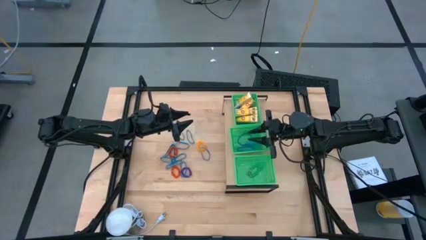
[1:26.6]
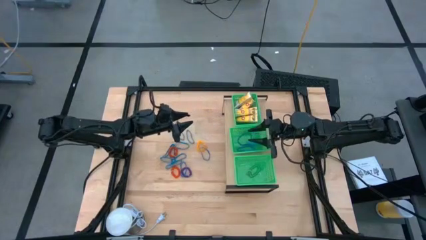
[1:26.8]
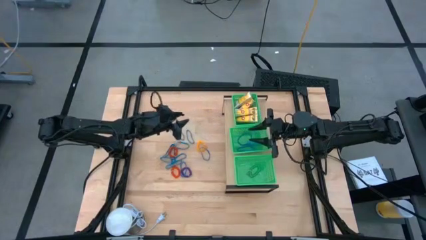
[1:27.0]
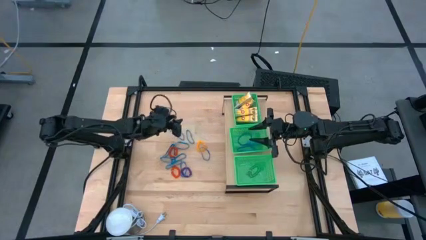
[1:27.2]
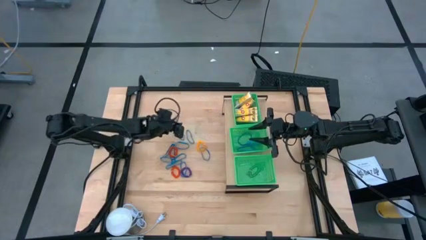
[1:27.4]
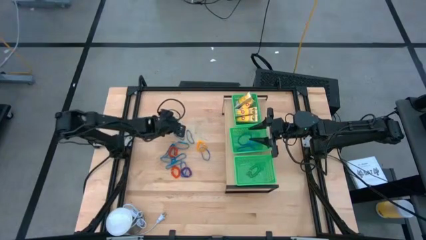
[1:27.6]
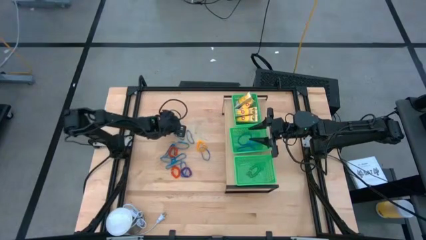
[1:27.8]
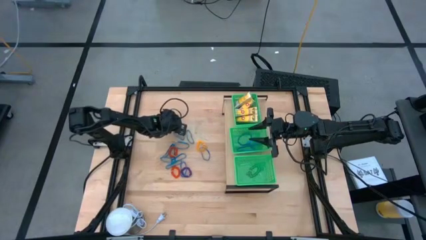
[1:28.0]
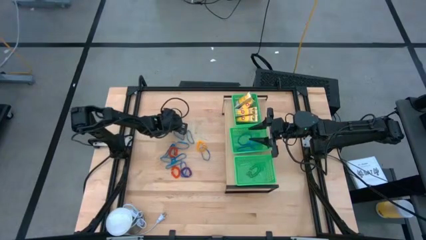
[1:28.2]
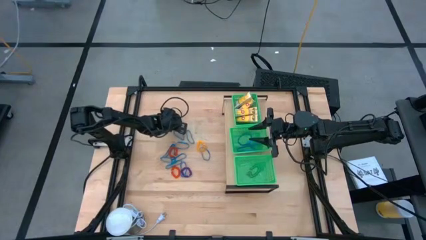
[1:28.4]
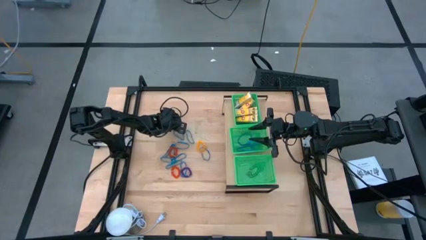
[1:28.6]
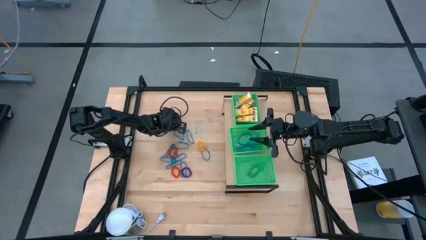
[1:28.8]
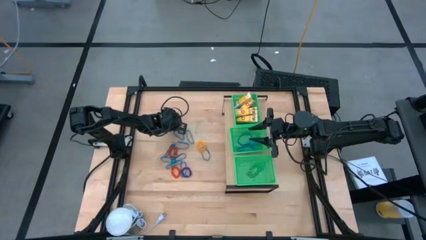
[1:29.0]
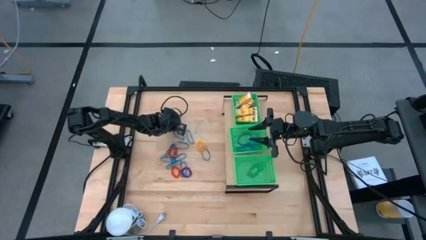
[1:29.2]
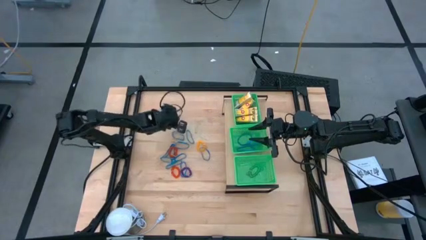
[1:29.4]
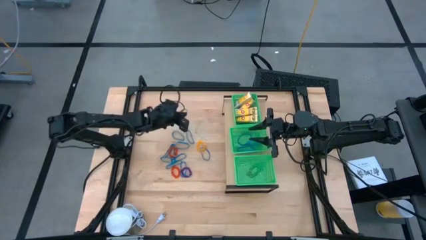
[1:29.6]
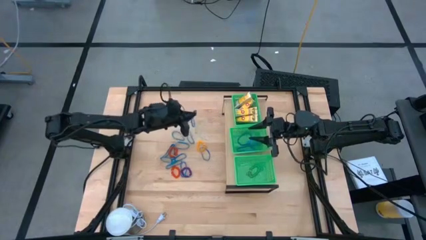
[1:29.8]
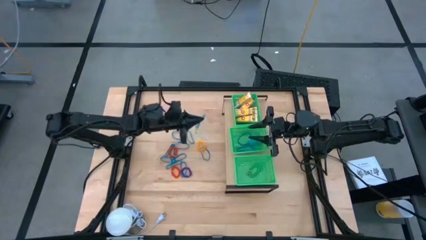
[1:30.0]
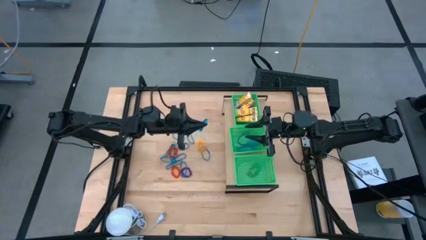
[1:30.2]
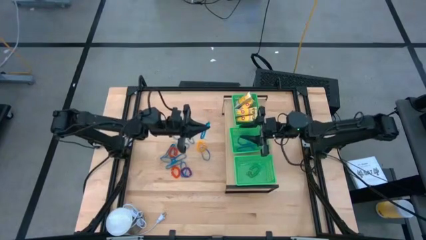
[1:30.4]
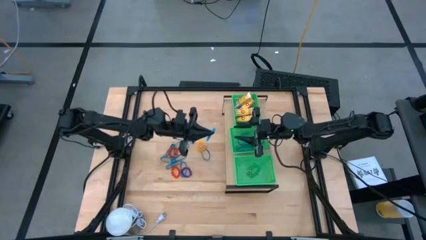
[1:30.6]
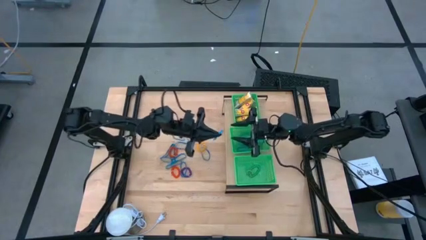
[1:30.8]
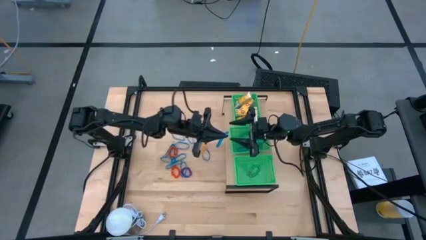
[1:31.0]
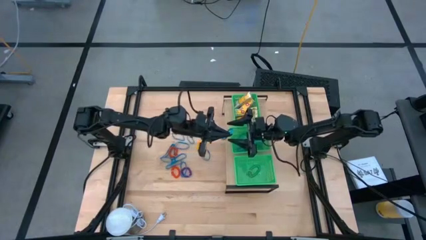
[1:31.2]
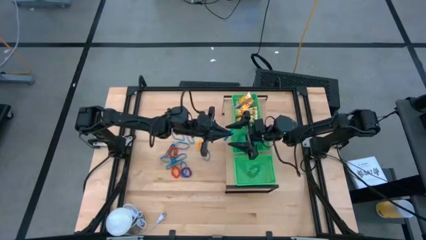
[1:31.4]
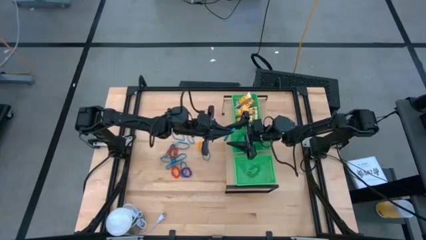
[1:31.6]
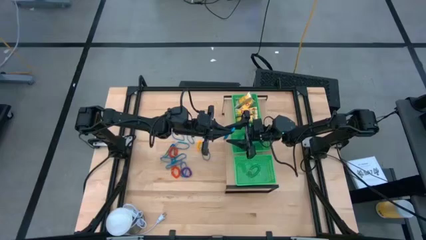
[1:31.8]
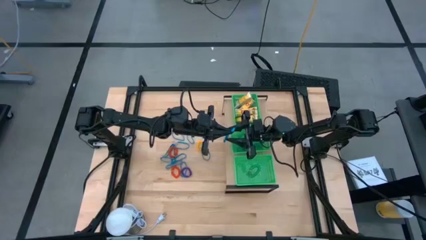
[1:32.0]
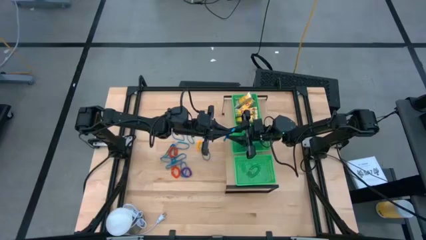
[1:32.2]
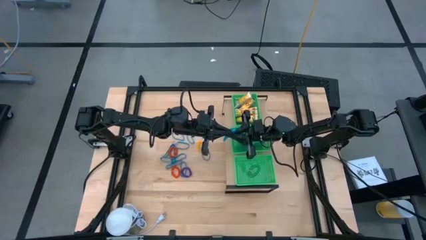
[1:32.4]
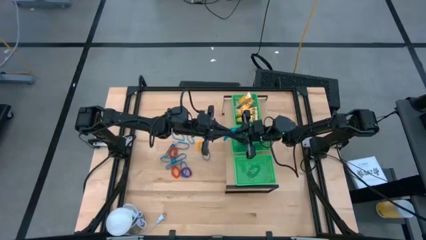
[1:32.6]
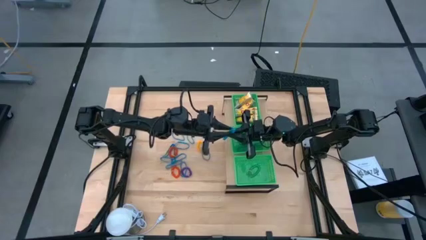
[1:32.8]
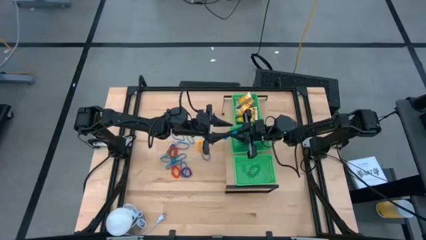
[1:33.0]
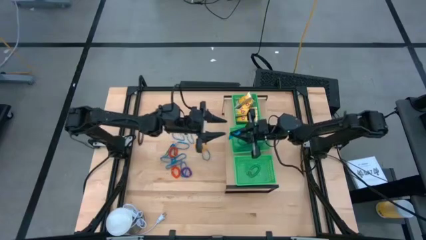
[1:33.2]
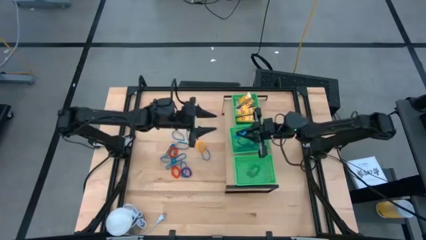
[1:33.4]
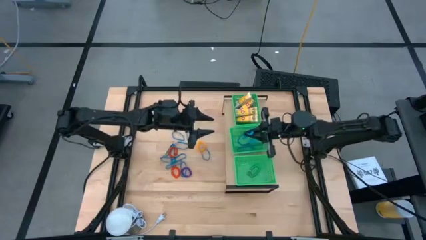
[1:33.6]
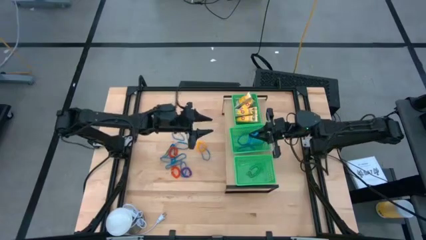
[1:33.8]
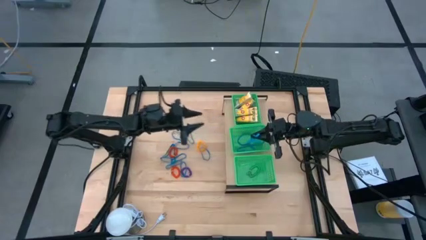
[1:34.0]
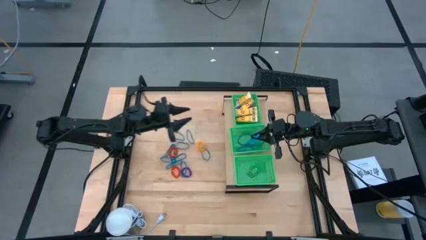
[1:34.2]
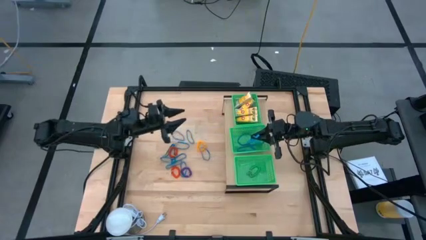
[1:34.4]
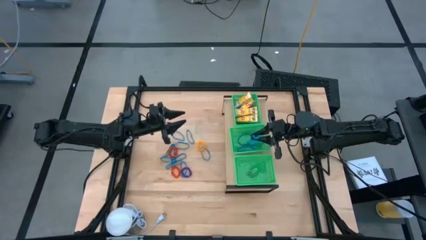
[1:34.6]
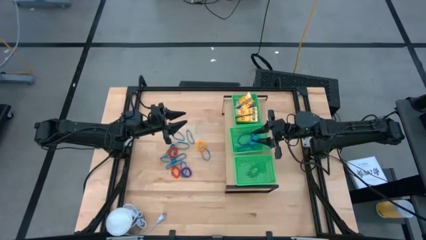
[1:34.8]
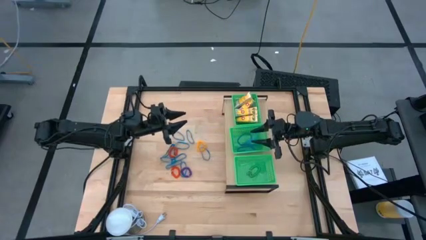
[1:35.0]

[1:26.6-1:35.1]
Task: Pick & Place Office Desk Supplies
Put the blue rubber band into the middle green bin

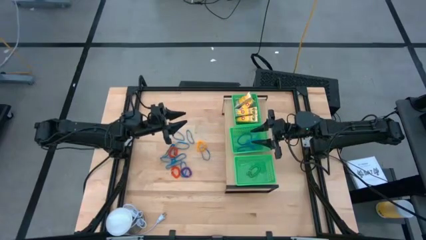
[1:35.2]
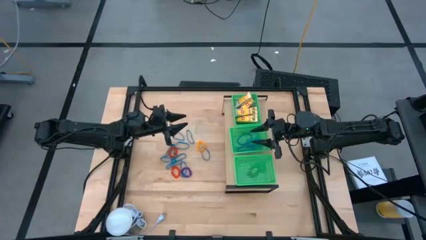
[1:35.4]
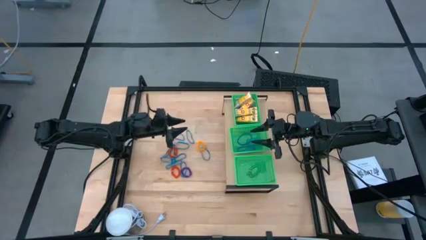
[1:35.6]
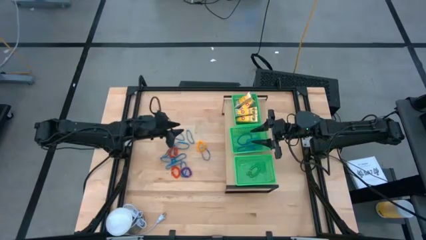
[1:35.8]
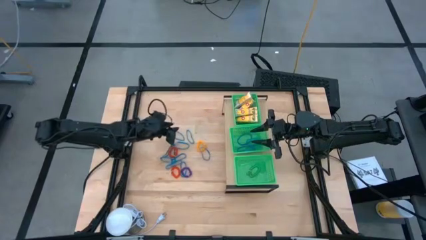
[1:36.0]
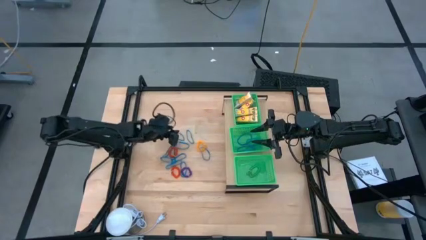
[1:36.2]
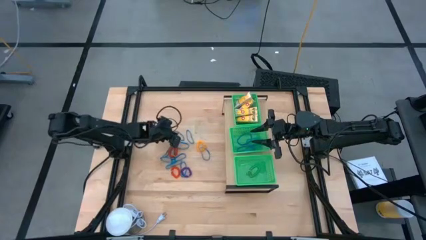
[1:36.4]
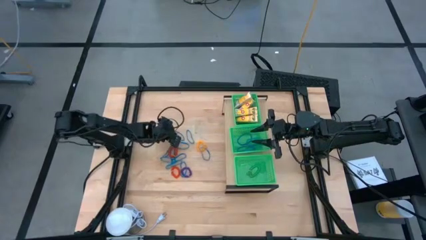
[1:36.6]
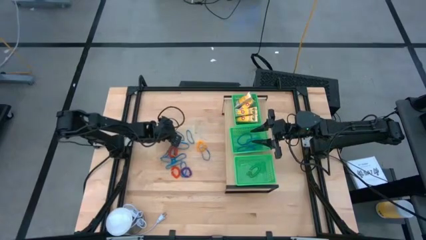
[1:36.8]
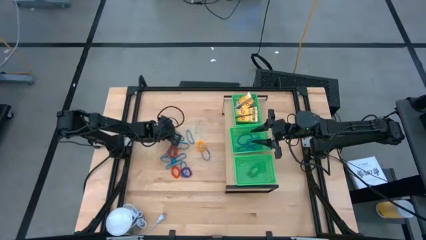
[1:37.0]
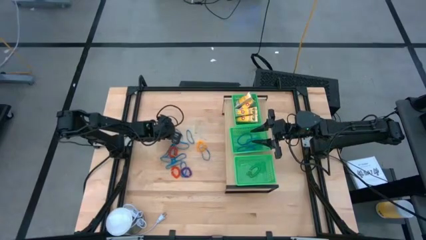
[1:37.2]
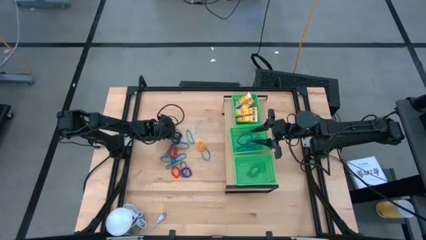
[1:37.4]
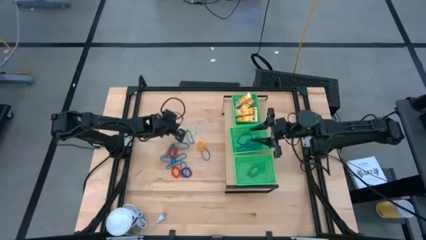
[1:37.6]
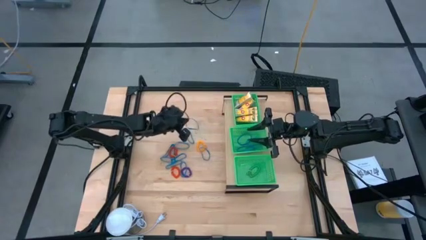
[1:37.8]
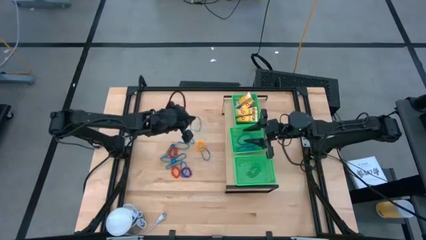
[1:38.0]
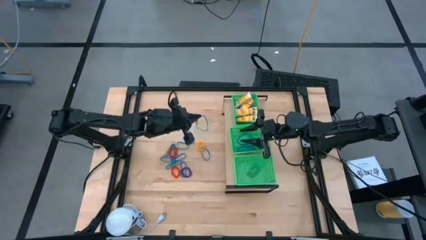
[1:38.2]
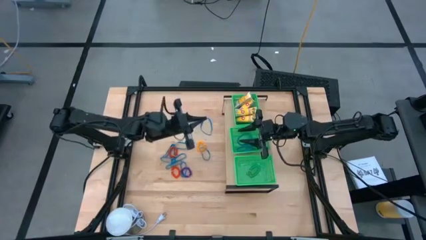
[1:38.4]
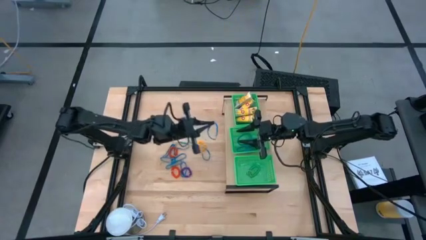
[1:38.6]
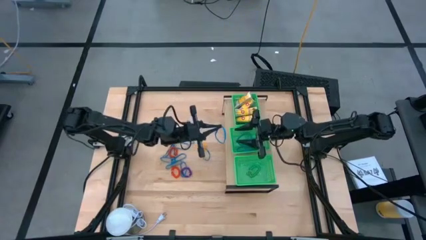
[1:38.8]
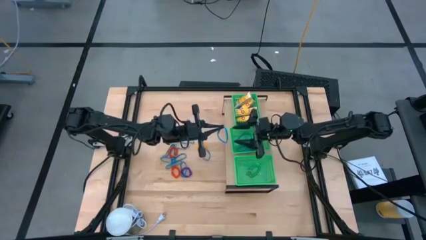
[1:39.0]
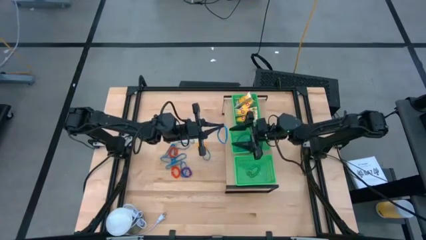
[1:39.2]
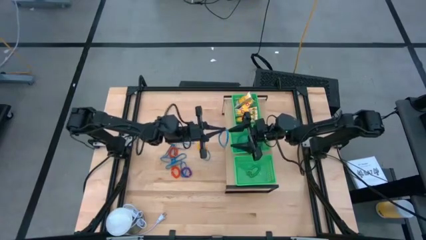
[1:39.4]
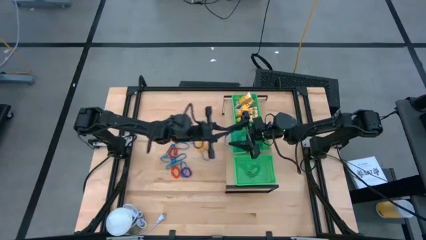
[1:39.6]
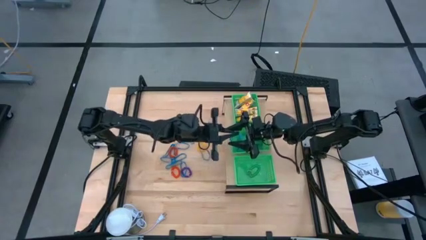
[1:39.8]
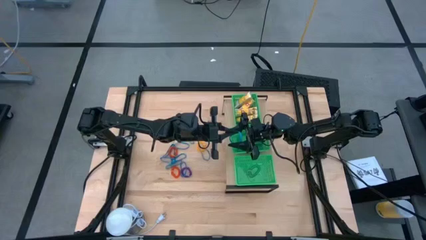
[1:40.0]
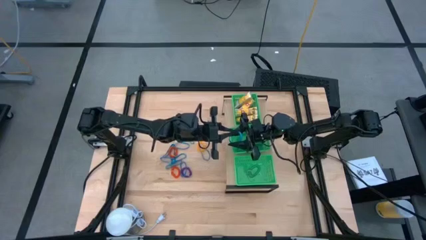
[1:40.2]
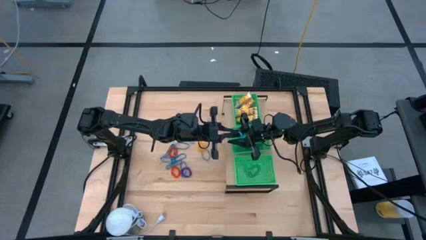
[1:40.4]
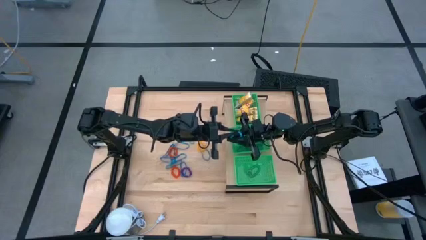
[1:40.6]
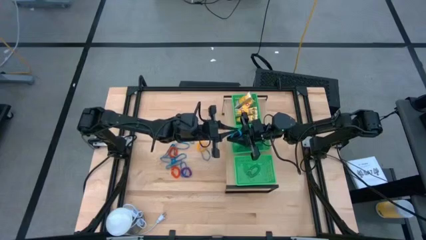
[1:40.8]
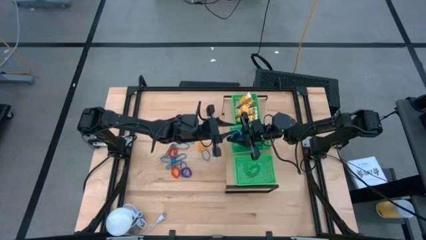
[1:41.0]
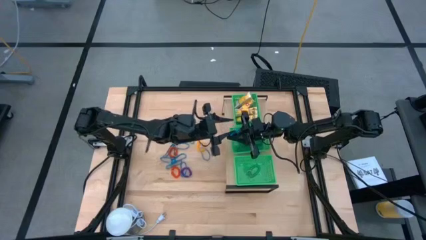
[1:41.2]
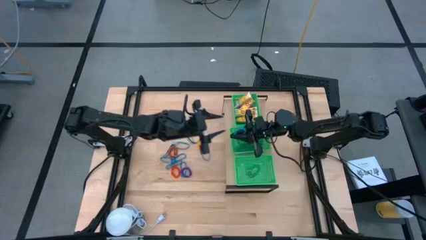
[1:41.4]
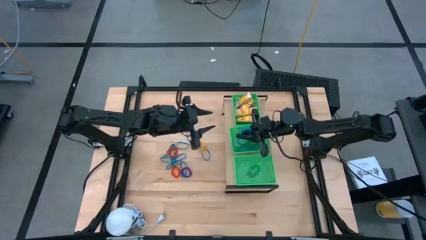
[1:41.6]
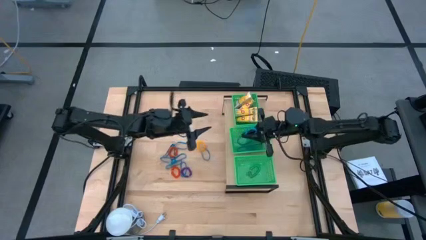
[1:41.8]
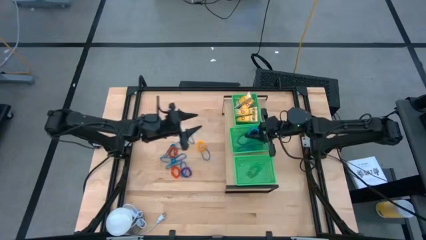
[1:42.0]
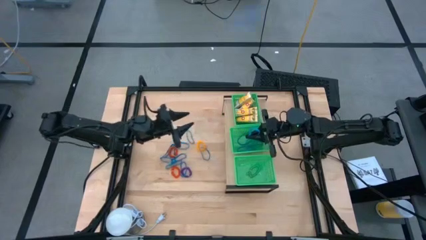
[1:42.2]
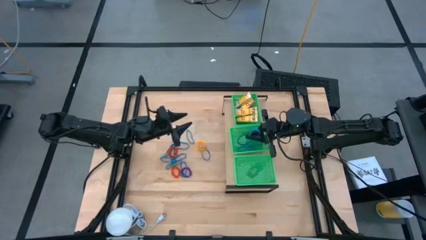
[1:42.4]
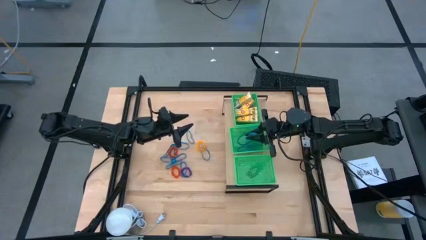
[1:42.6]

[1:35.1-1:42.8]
Put the blue rubber band into the middle green bin
